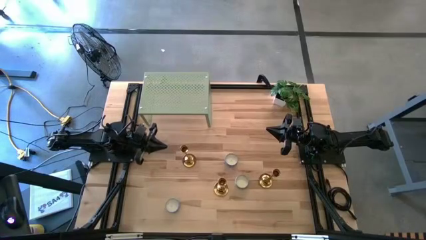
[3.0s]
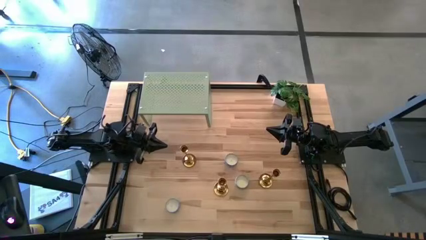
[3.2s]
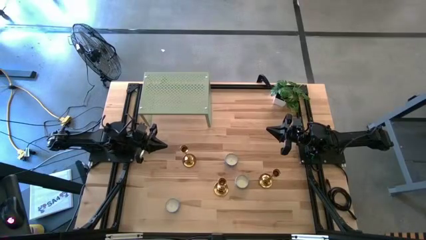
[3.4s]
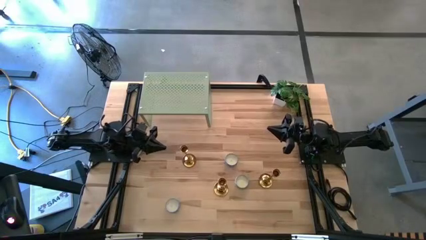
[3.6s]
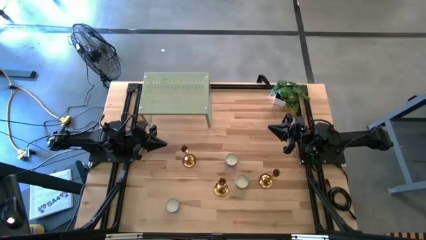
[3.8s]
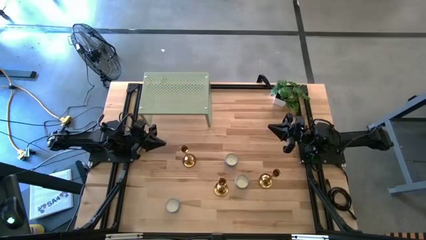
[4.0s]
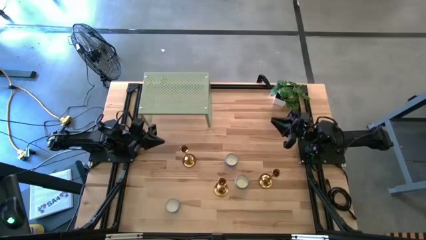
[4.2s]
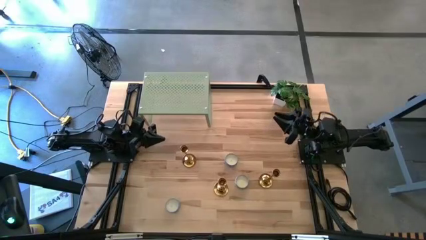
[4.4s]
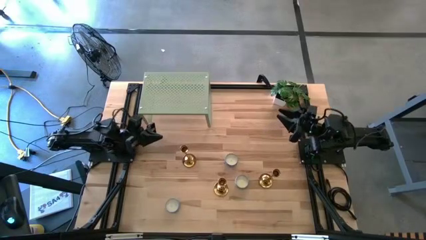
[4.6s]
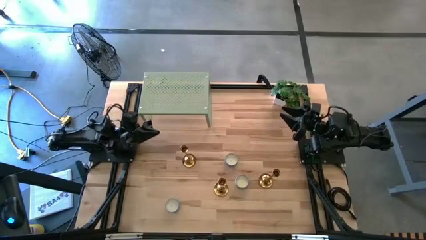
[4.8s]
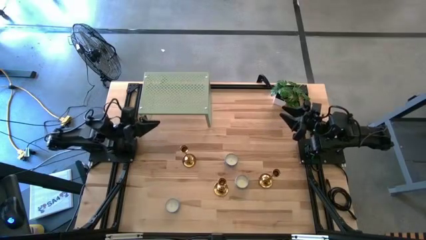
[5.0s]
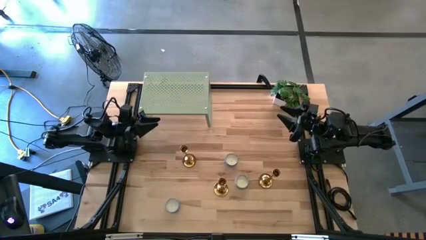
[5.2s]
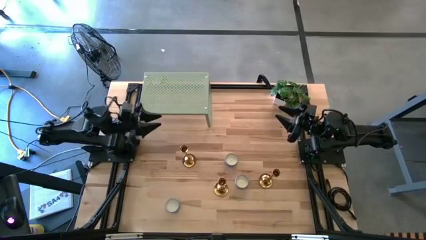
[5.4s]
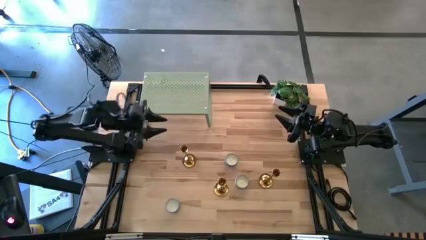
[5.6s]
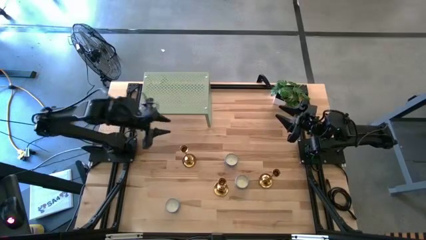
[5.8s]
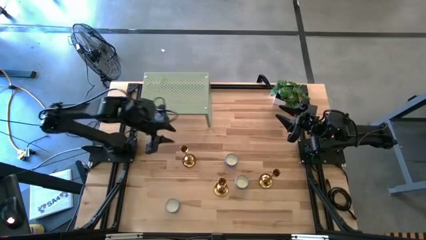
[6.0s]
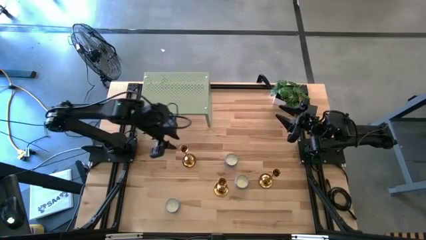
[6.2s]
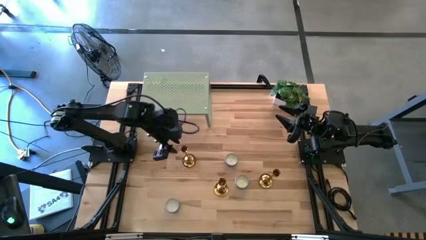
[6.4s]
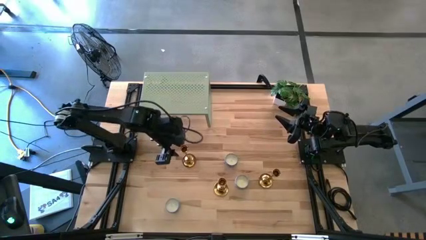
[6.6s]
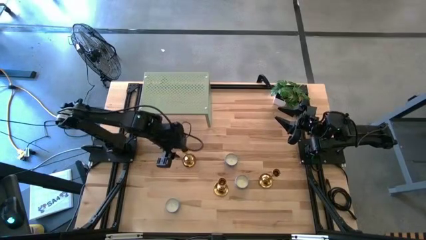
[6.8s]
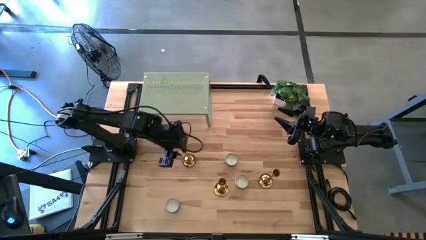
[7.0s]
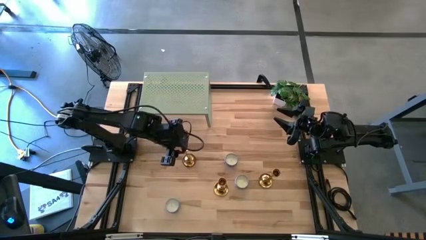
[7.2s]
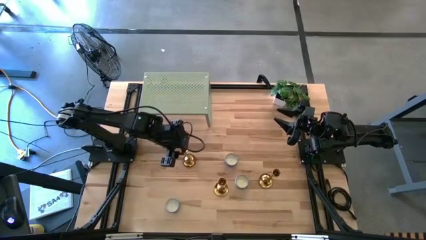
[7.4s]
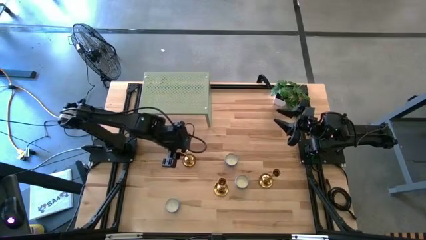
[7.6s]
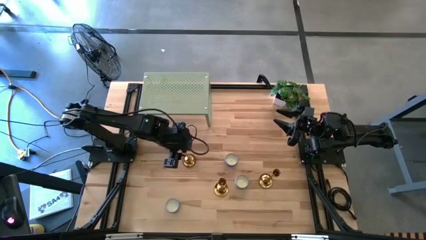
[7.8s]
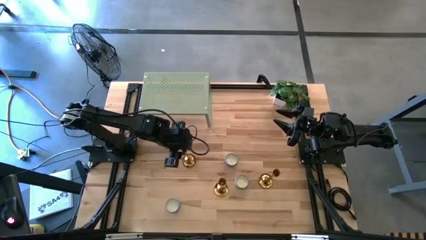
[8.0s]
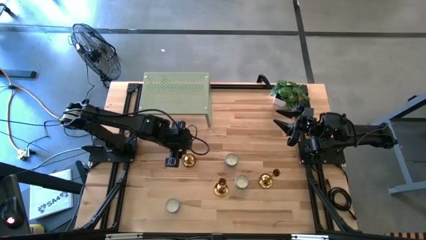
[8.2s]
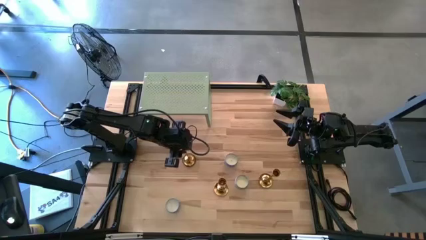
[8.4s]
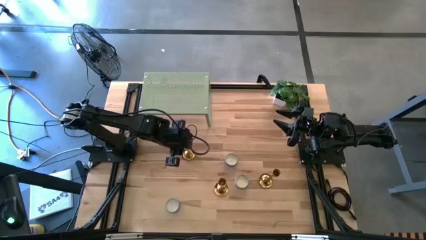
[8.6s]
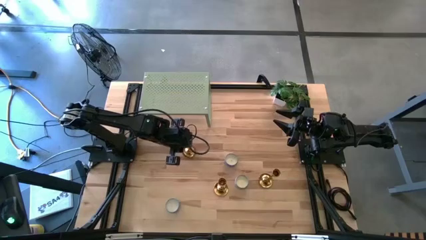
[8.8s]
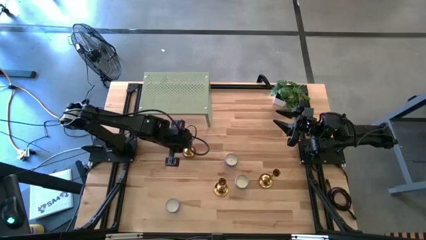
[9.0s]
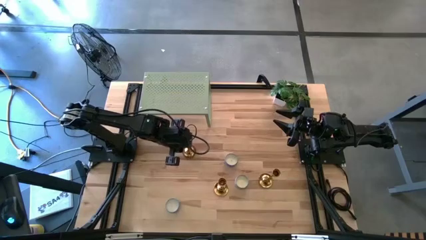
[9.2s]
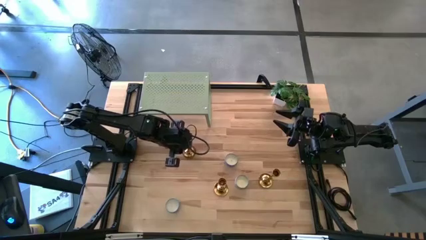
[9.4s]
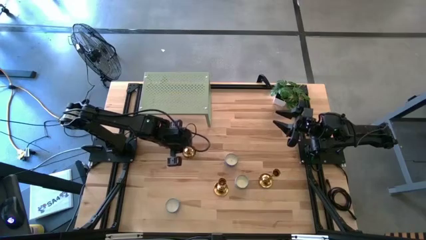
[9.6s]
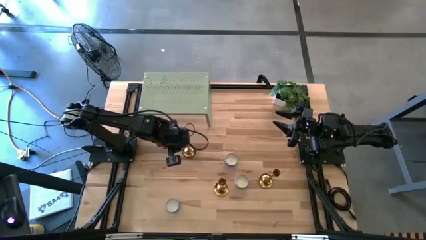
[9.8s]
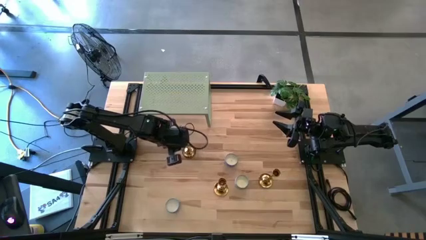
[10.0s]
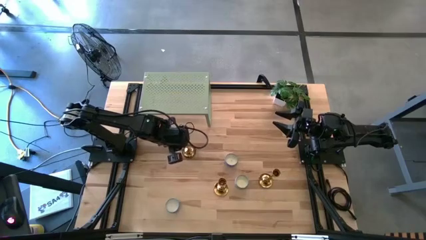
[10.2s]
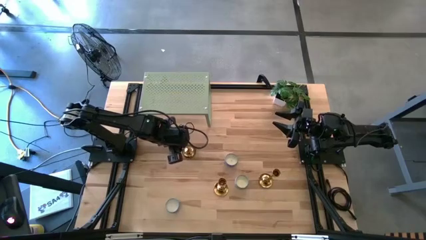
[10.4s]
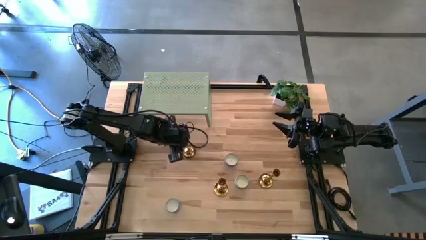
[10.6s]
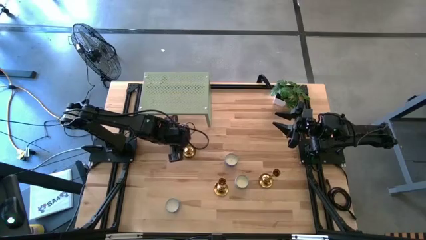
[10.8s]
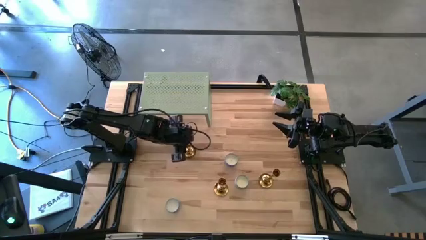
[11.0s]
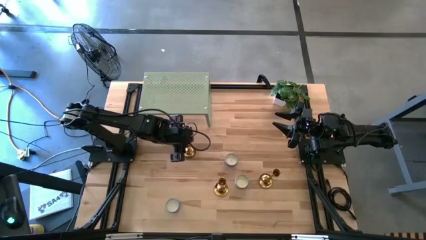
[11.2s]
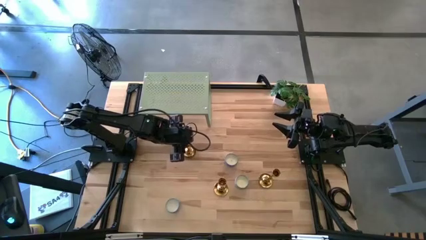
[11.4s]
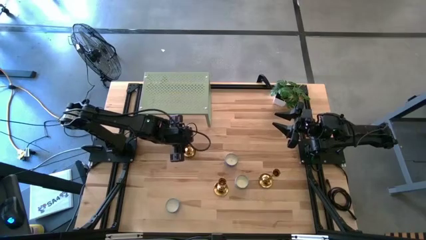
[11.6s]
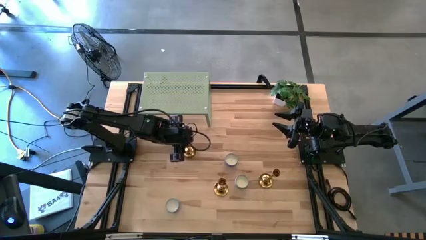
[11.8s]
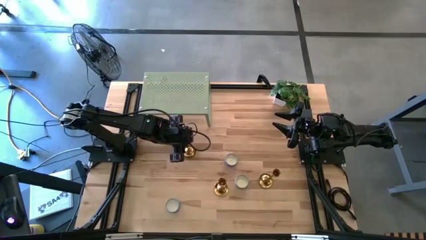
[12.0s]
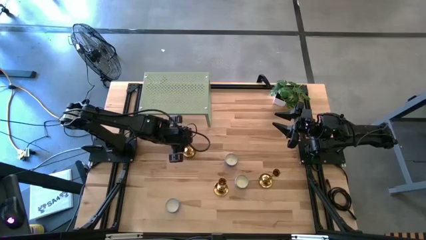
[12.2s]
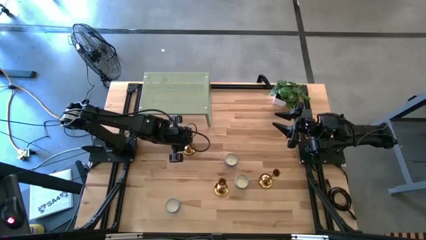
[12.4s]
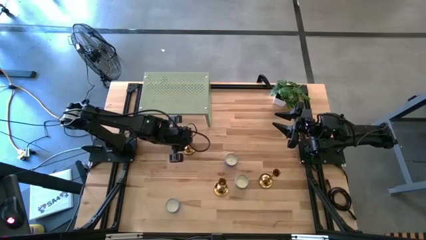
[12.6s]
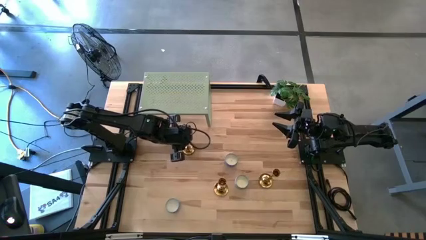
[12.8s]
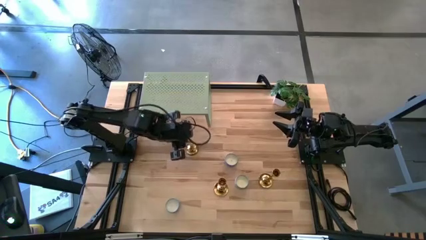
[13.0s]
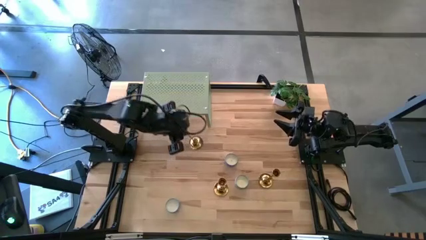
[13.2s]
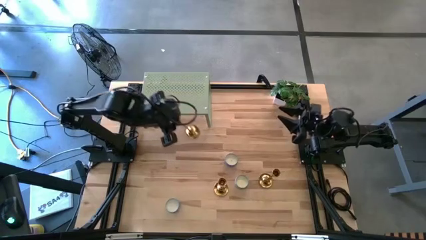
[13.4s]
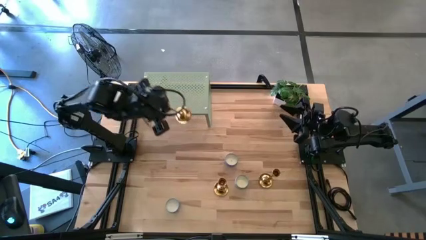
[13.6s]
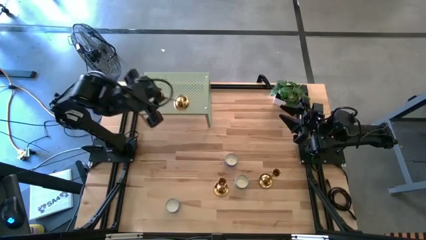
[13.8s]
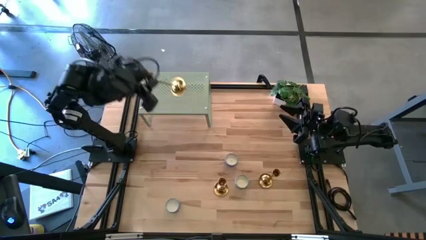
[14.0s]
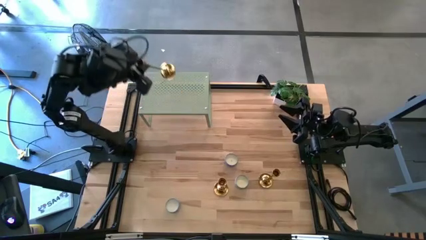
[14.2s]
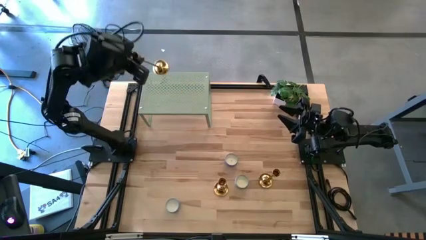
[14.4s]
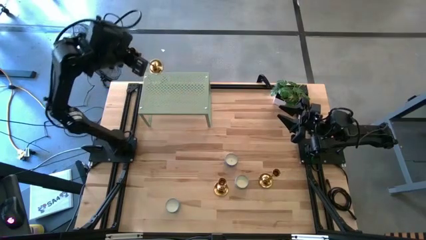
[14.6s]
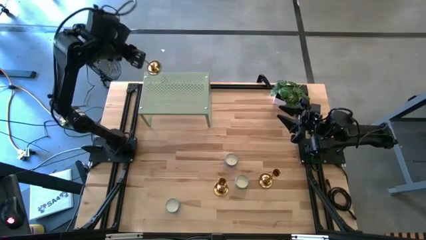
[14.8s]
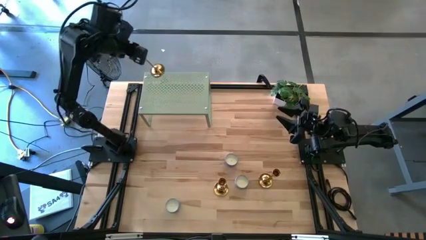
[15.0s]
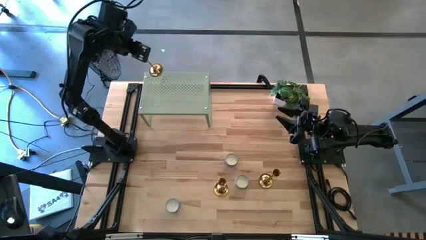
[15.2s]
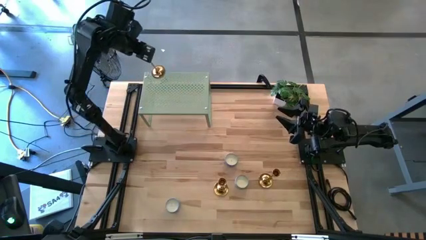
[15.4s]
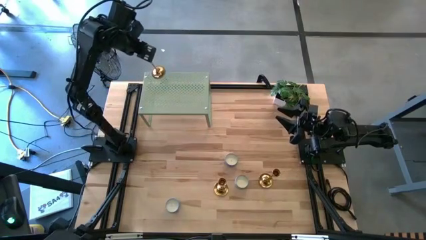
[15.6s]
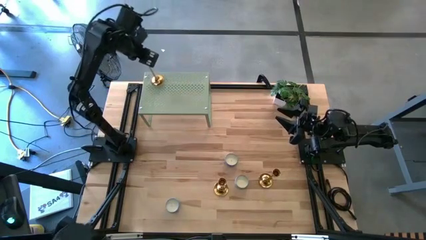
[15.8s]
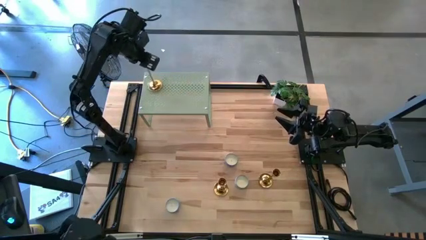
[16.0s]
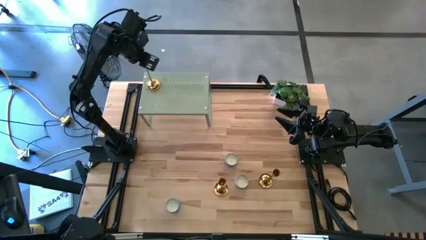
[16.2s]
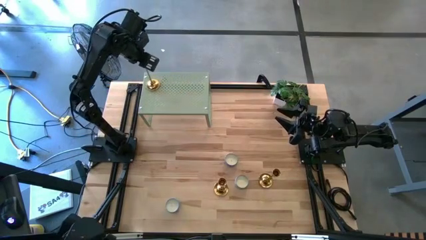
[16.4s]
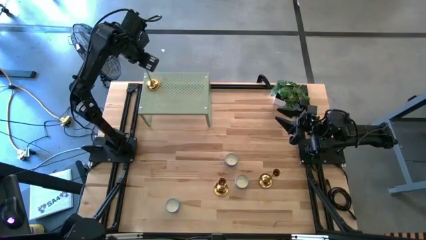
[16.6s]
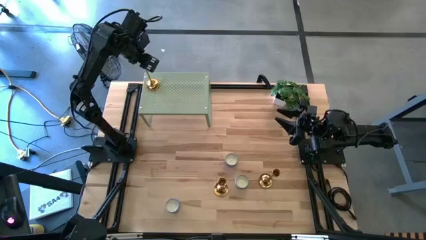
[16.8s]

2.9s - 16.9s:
Task: Pick & Place candle stick holders
Put the top left gold candle holder on the shelf
